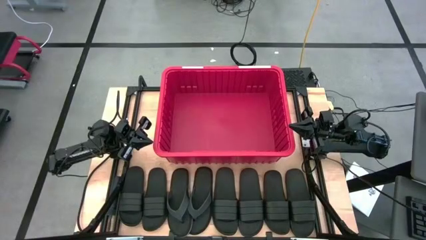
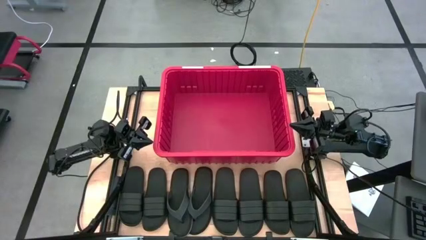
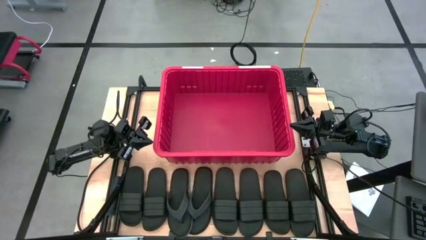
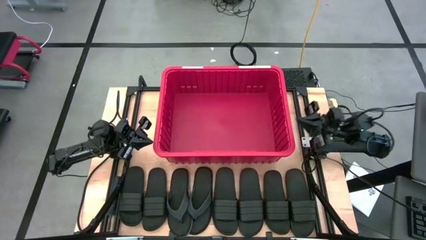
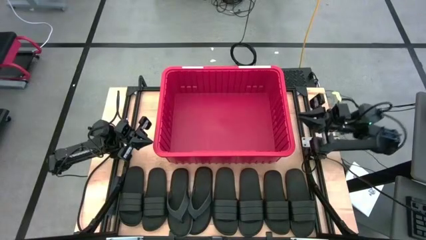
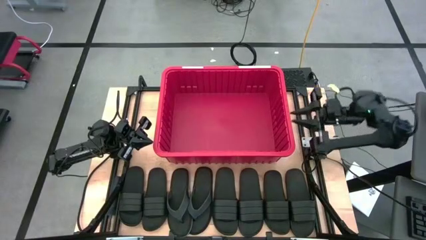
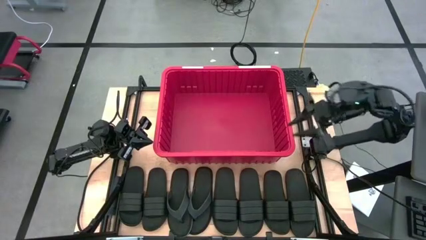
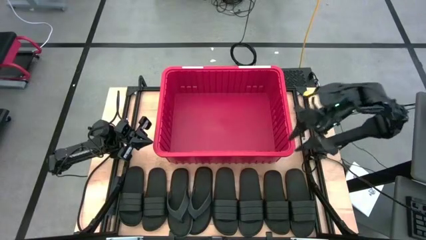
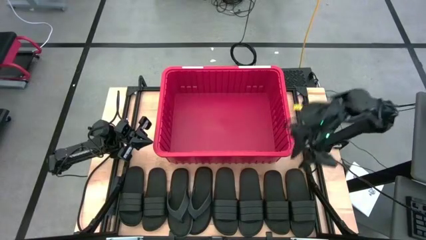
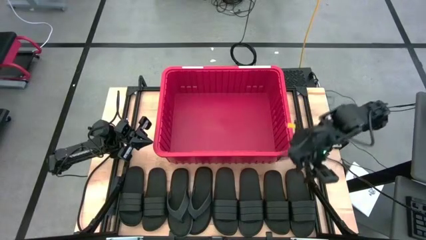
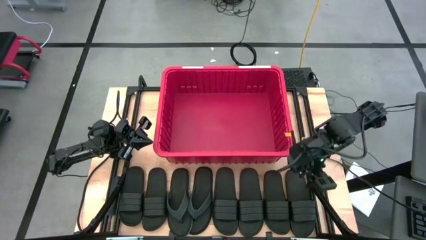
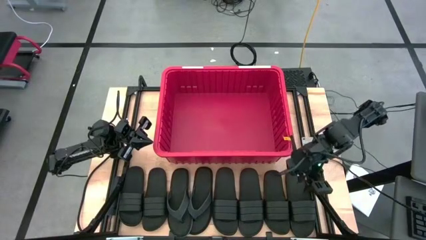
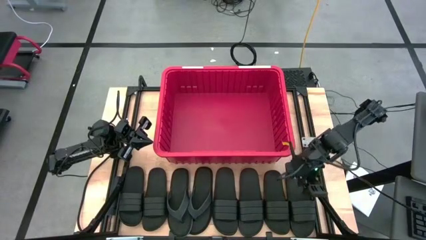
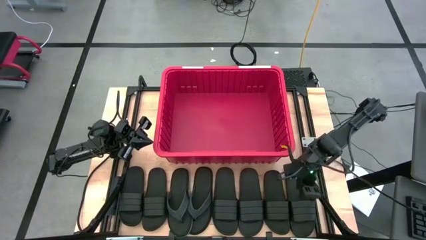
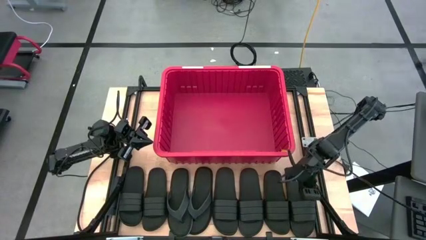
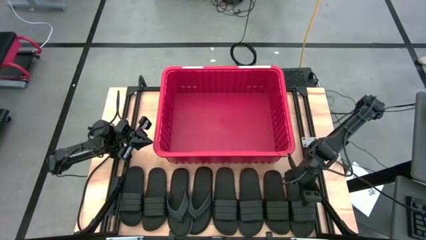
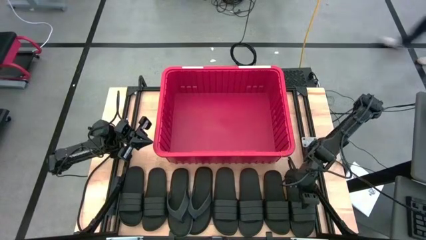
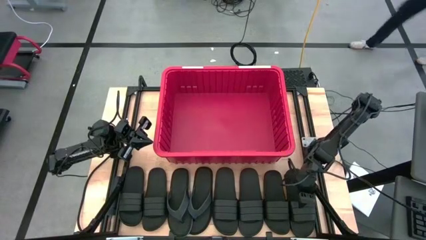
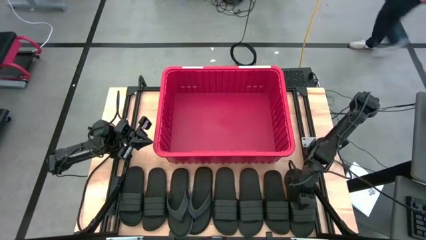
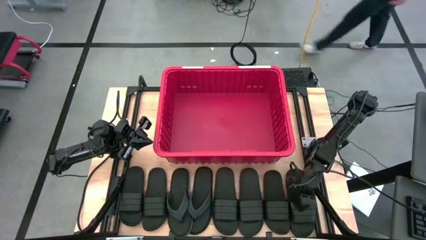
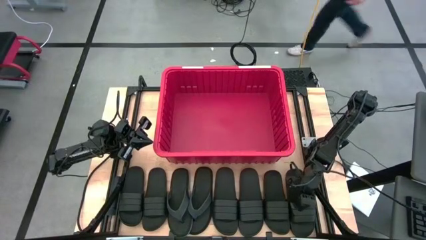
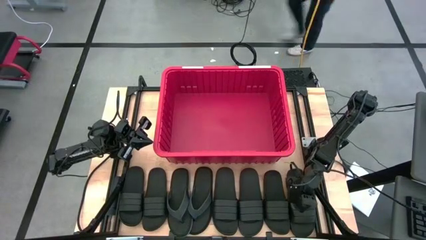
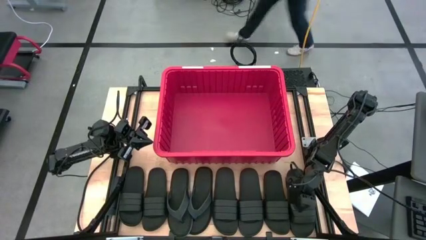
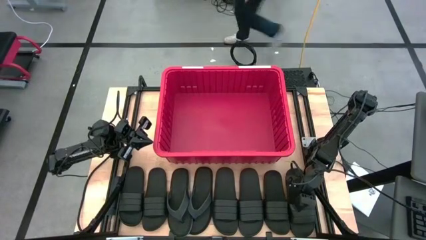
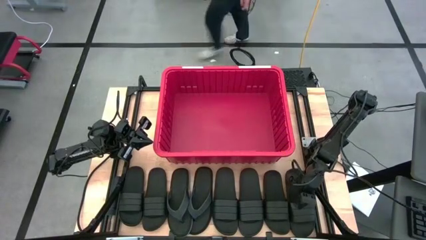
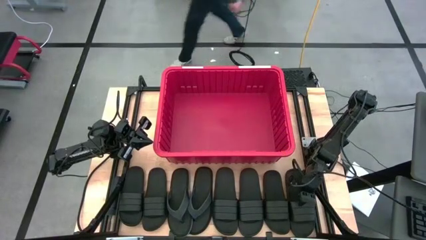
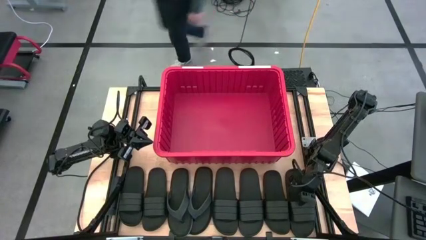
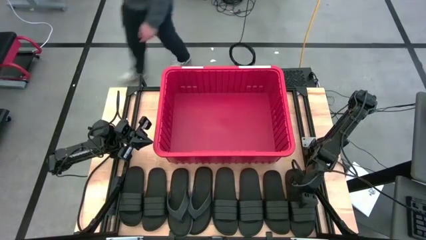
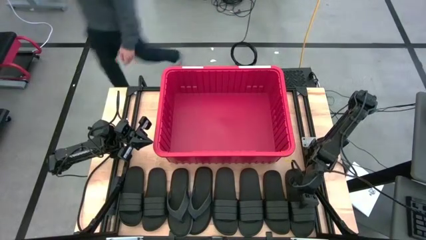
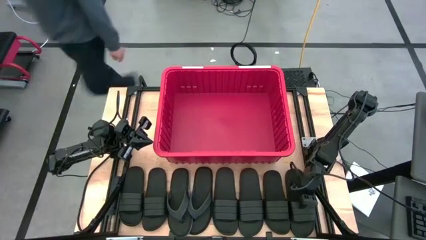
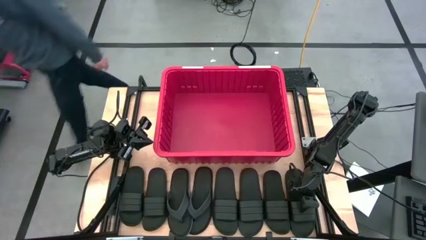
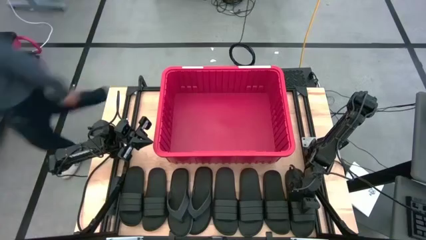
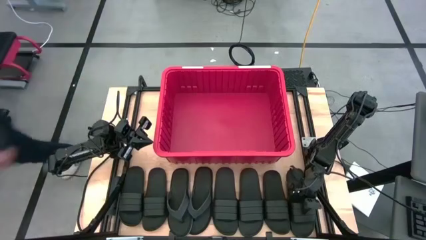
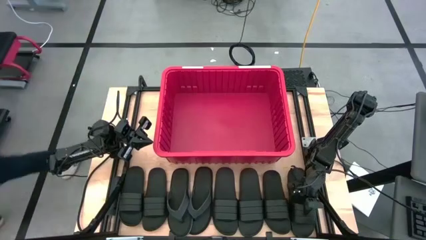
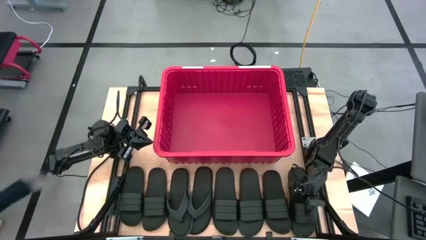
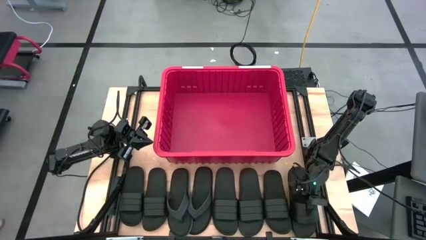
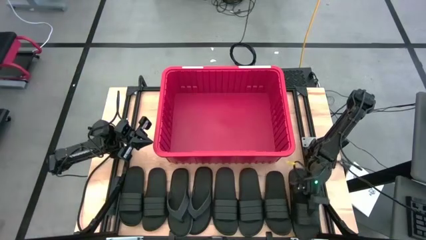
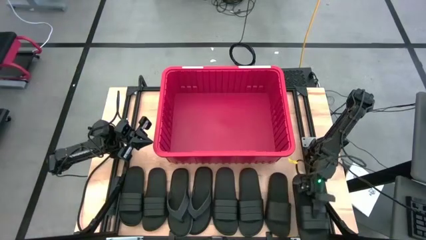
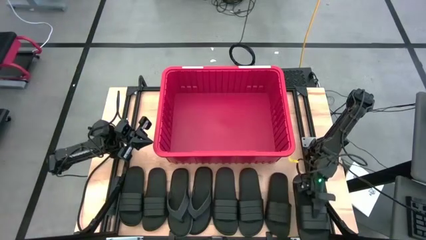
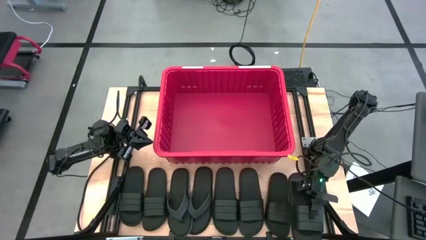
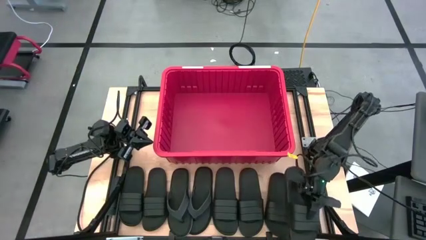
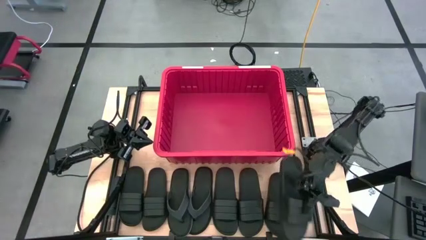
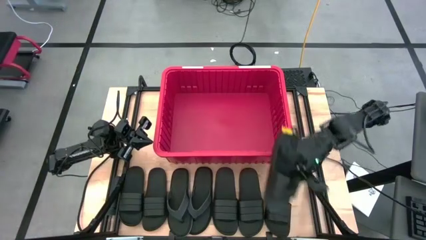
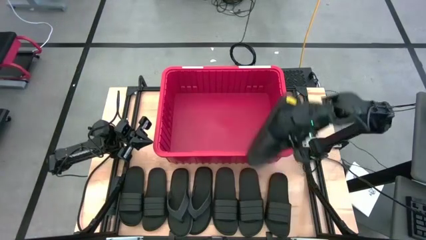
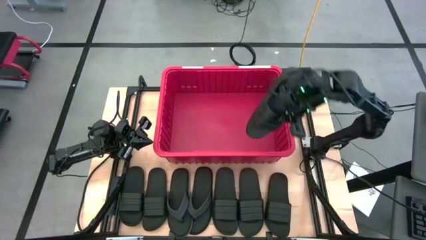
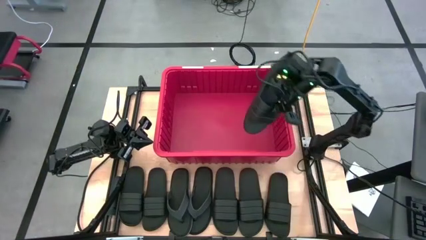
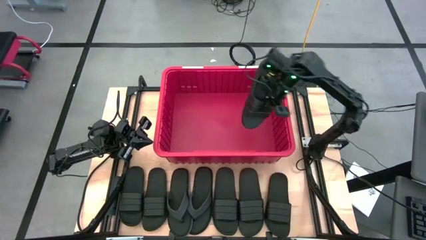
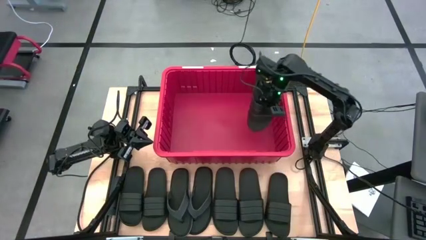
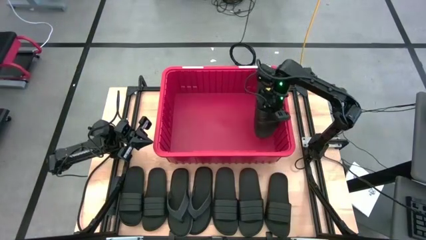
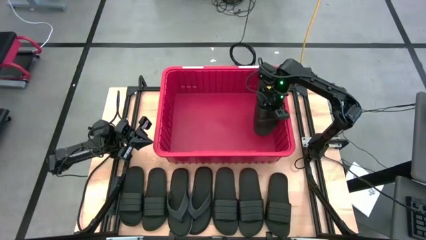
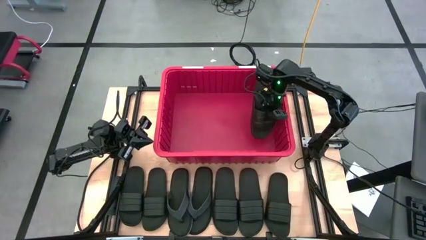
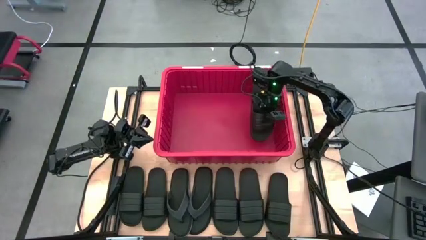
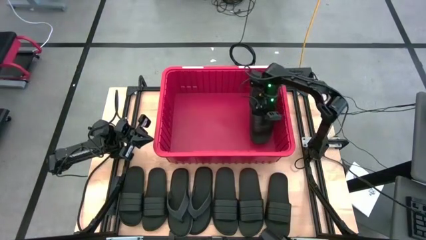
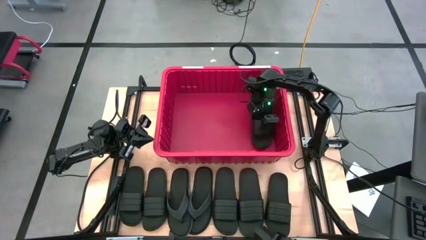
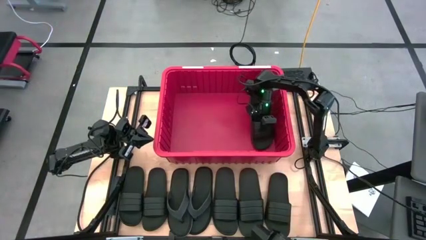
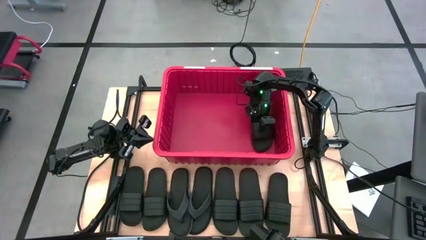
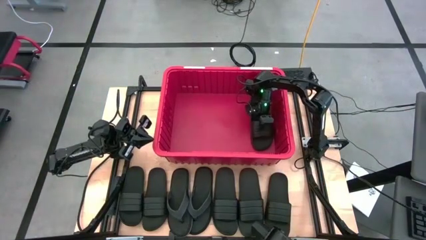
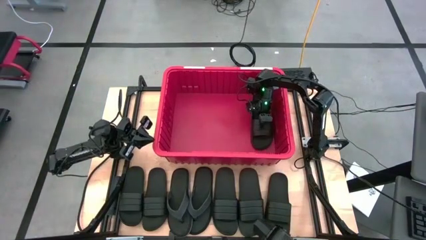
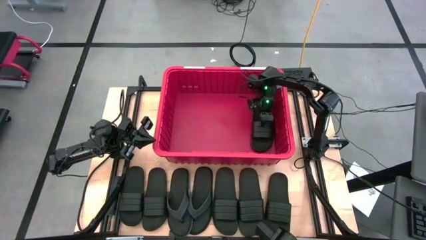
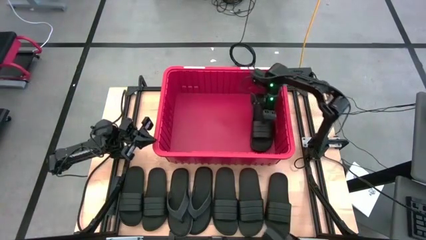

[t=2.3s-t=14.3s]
Task: Pick and place slides into bin
Put the slipper into the bin
